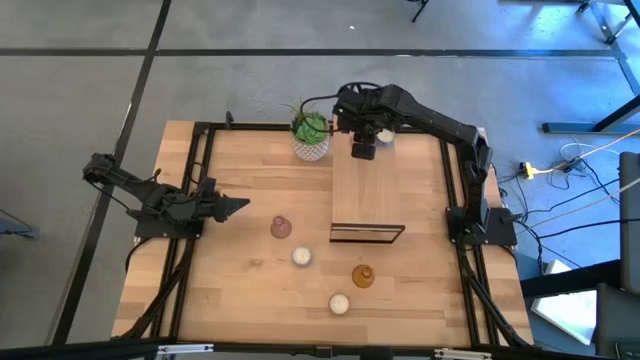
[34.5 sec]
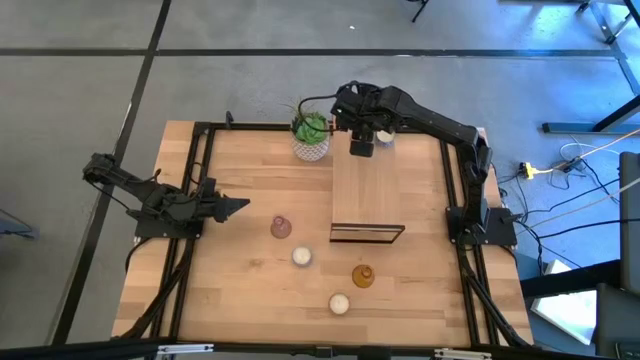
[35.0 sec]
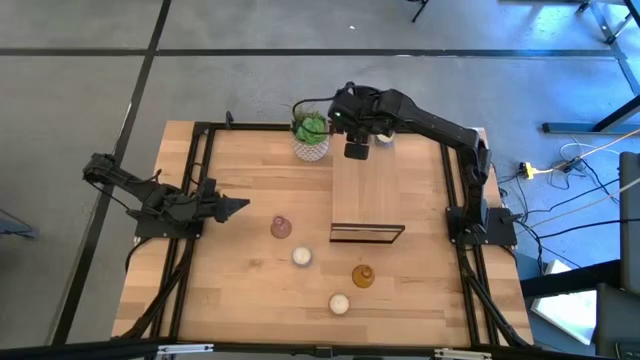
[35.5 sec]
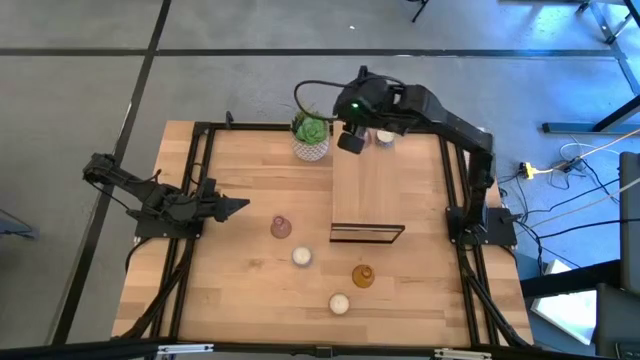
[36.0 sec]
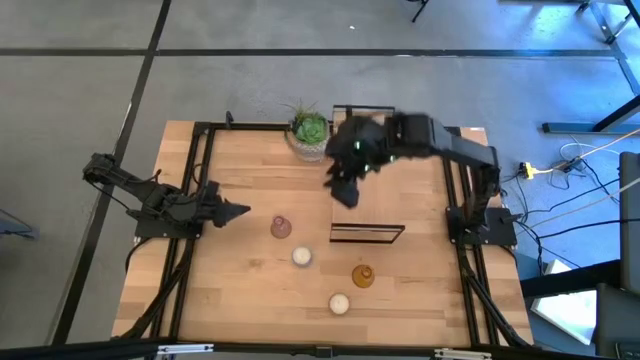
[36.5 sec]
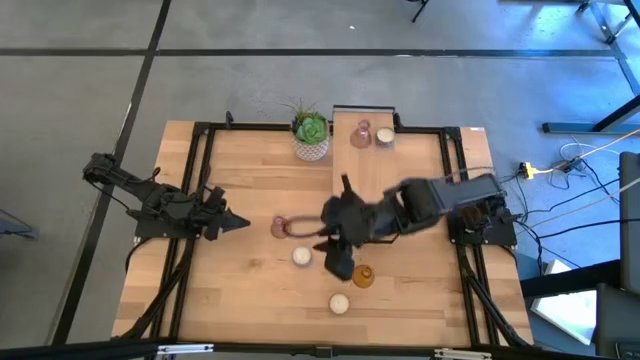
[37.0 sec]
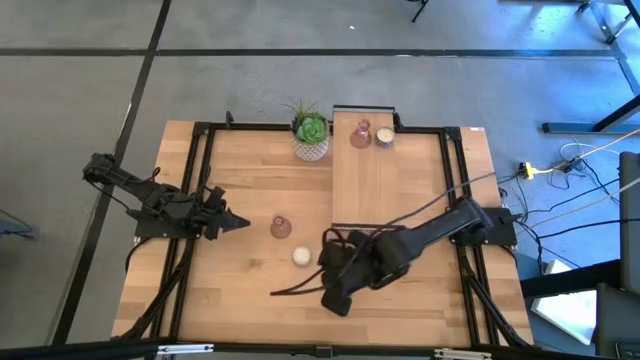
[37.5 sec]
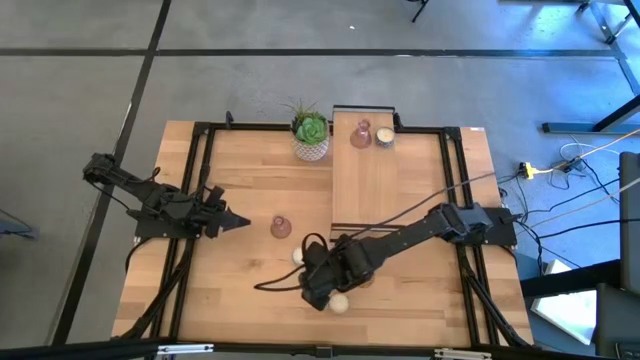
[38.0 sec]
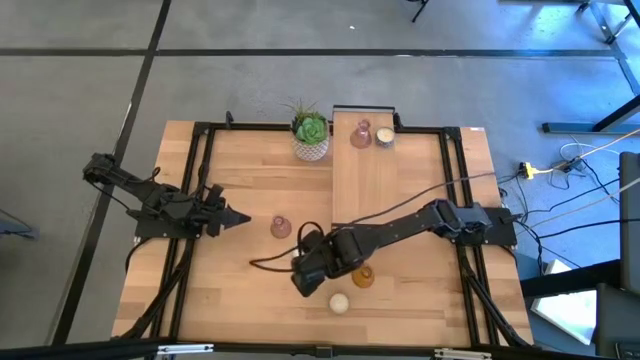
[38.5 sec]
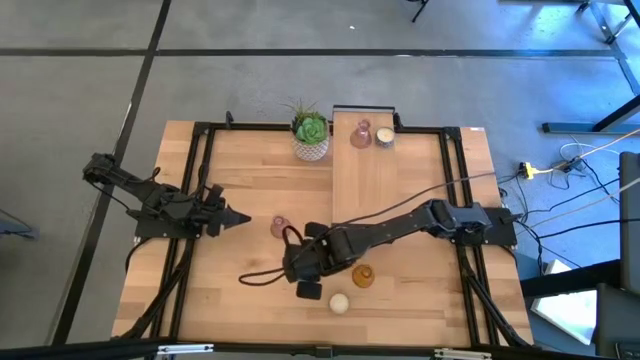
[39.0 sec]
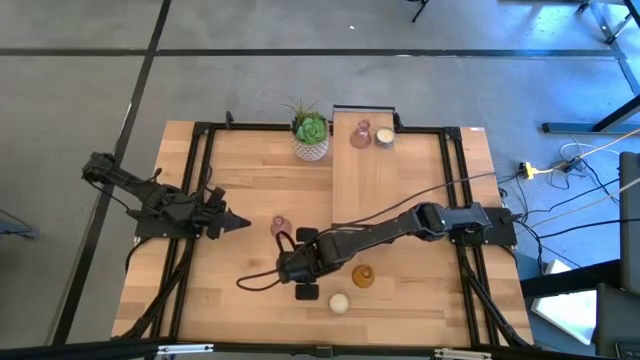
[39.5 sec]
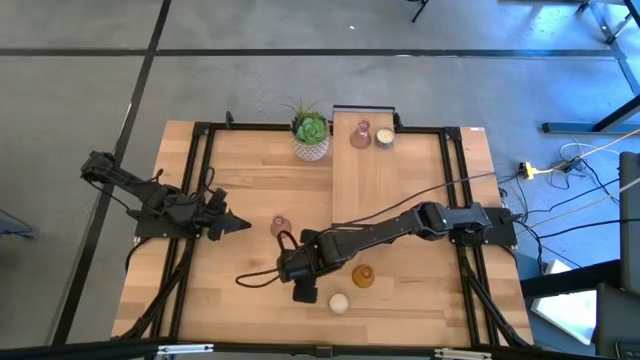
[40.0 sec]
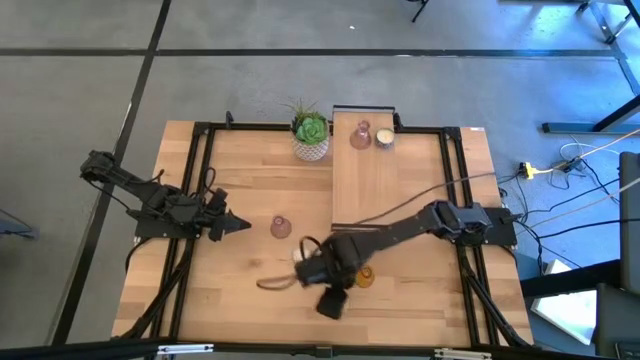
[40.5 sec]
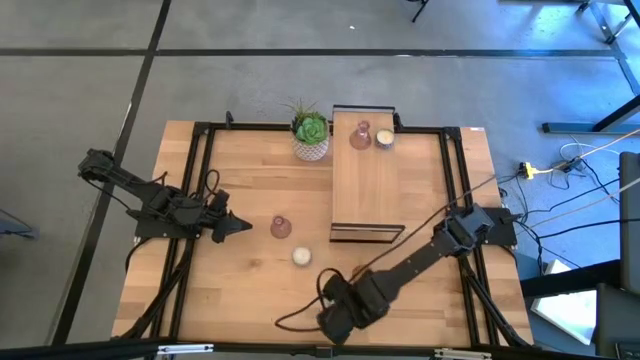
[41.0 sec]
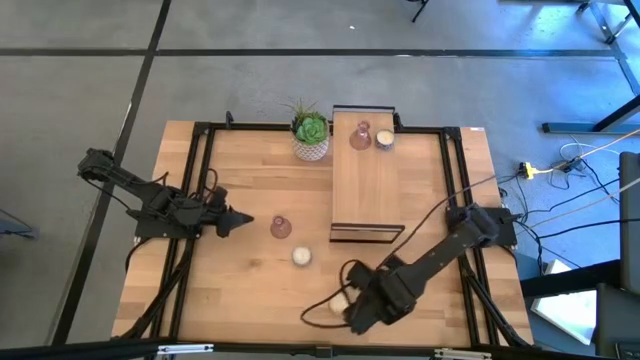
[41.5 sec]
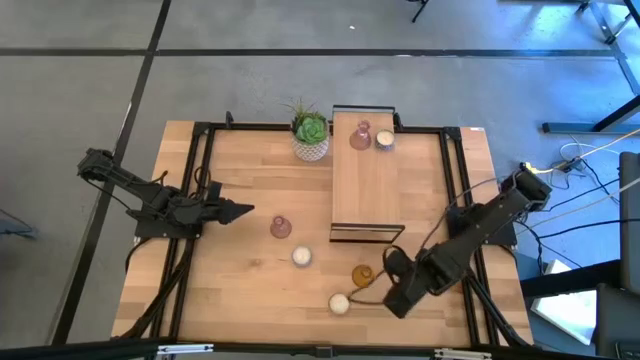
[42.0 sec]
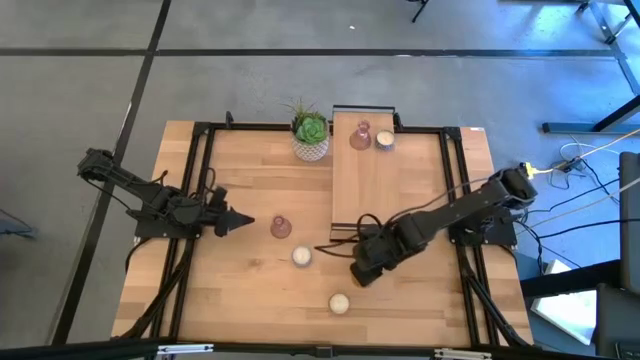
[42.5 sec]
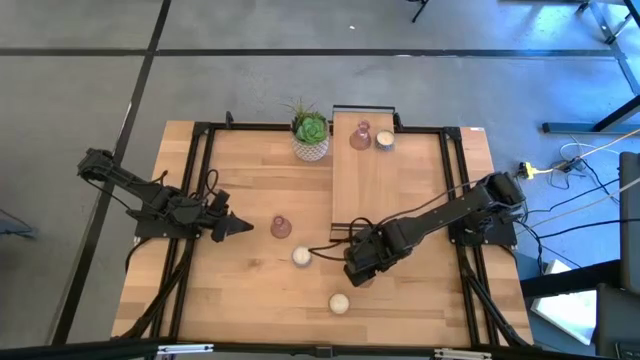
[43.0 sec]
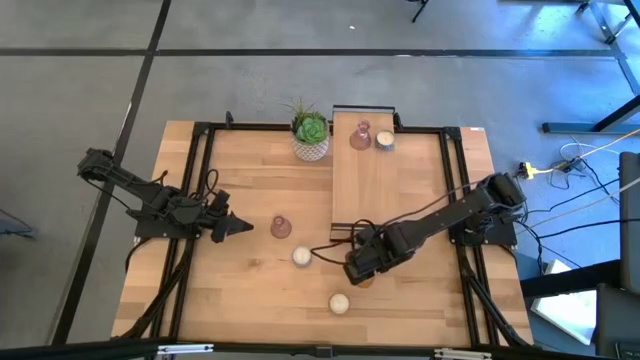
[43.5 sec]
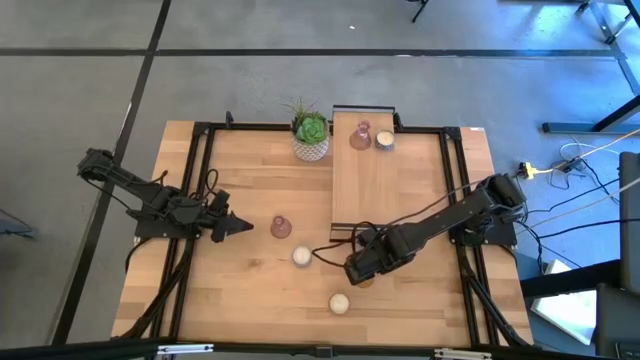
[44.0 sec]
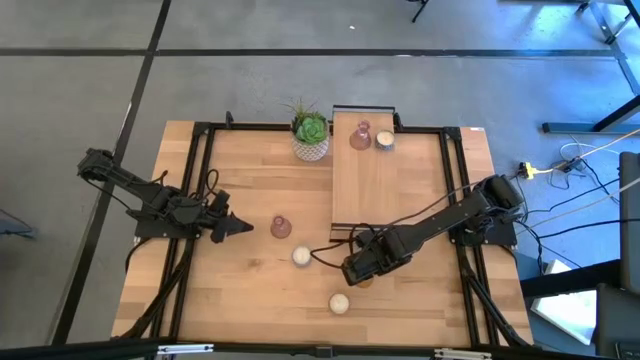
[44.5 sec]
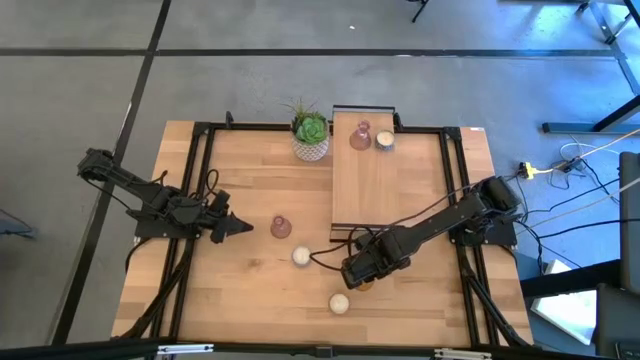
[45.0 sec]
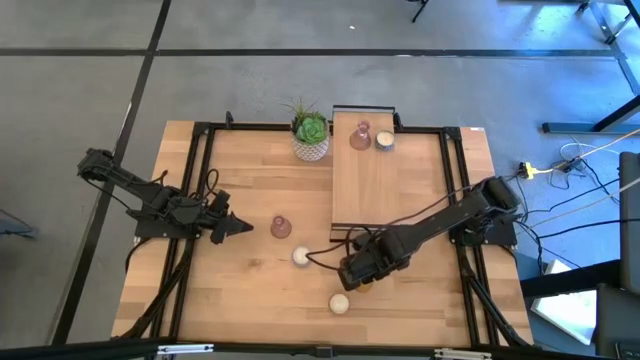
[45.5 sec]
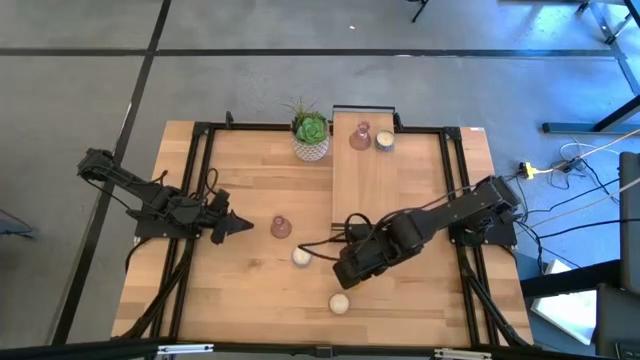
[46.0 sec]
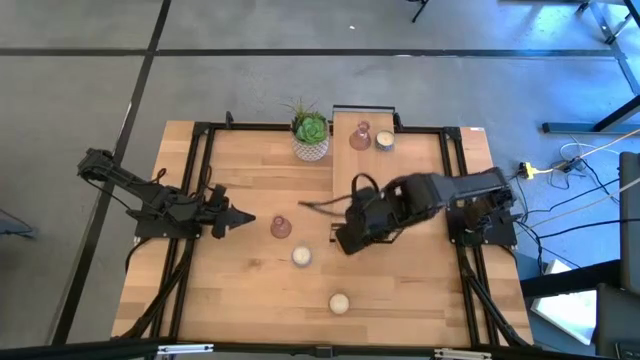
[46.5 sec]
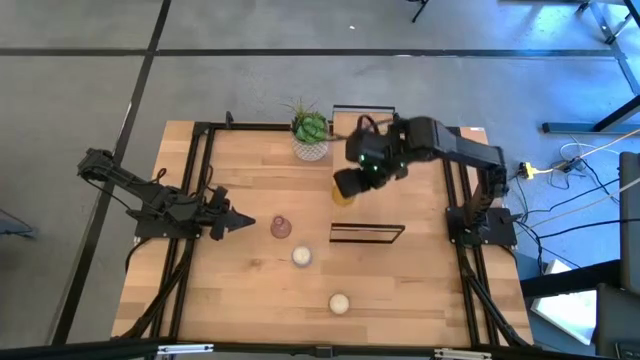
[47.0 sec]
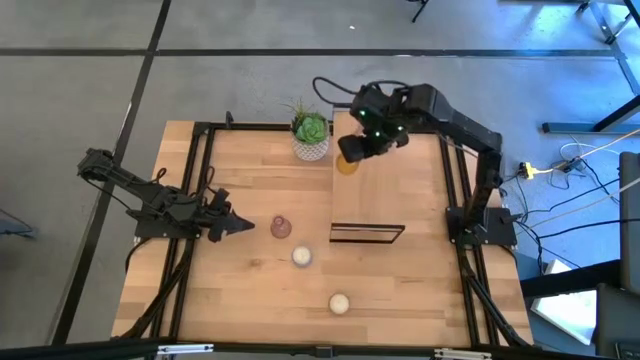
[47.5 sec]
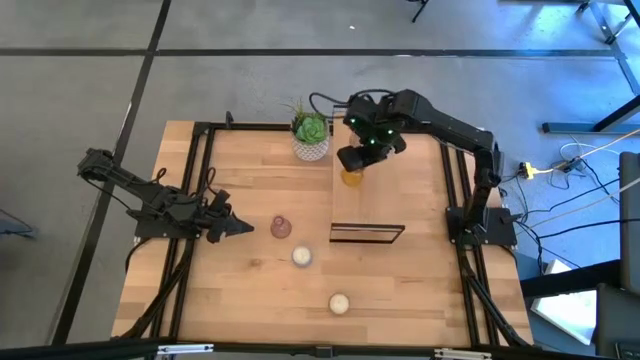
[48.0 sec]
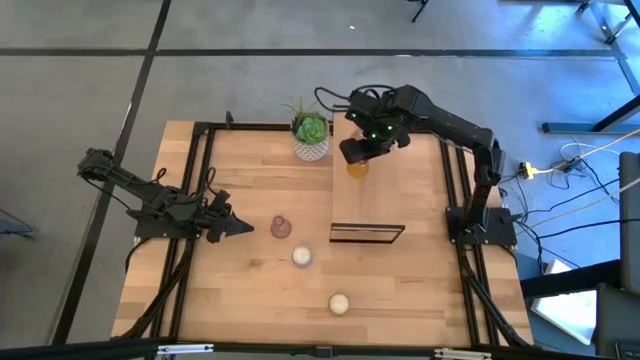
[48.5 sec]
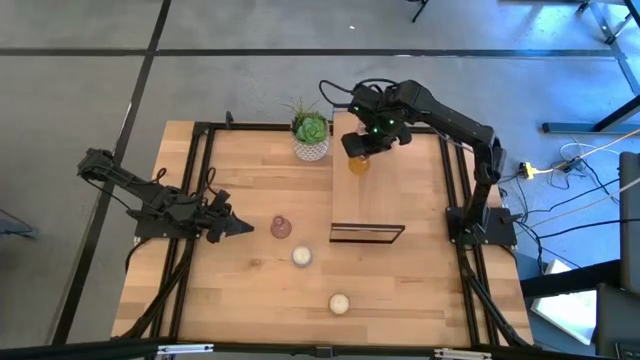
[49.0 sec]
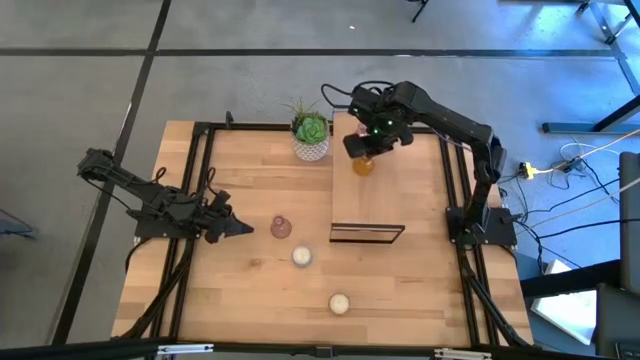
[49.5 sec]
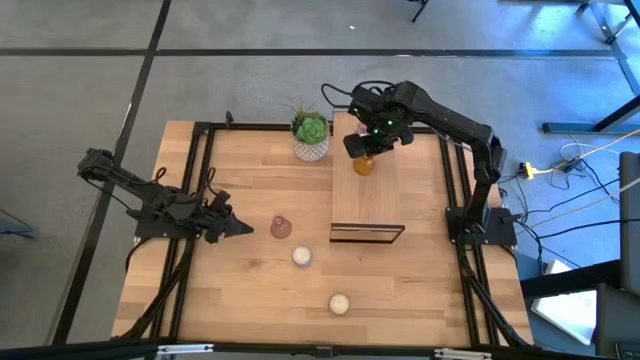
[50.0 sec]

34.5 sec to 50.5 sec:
Task: Pick & Place candle stick holders
Put the orange glass candle holder on the shelf aligned with the pink glass candle holder

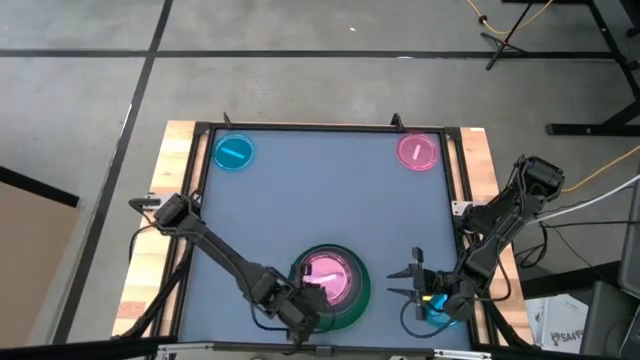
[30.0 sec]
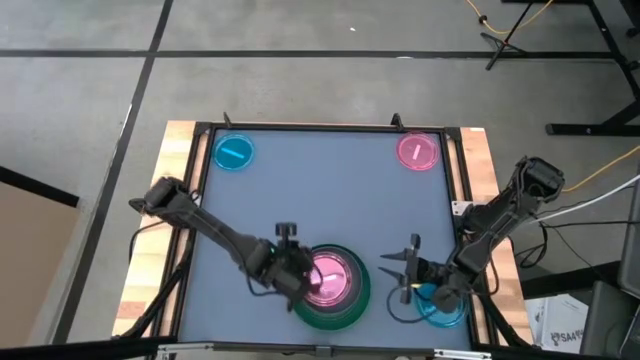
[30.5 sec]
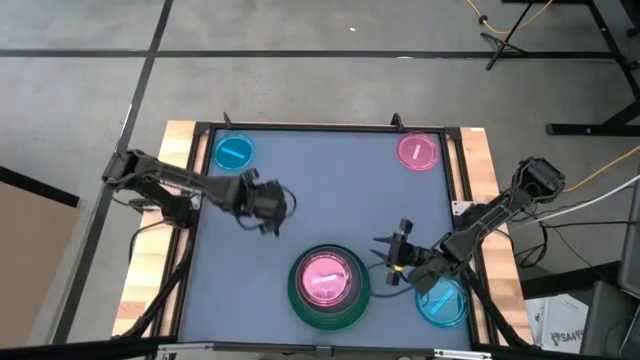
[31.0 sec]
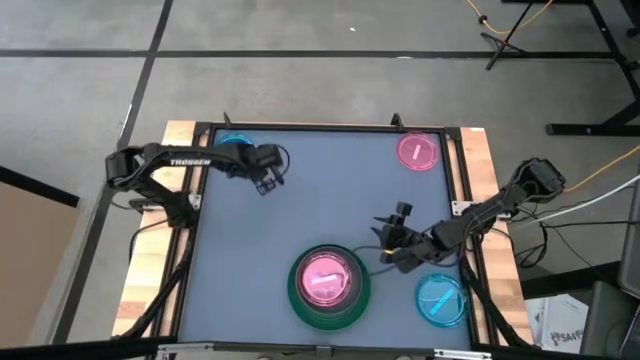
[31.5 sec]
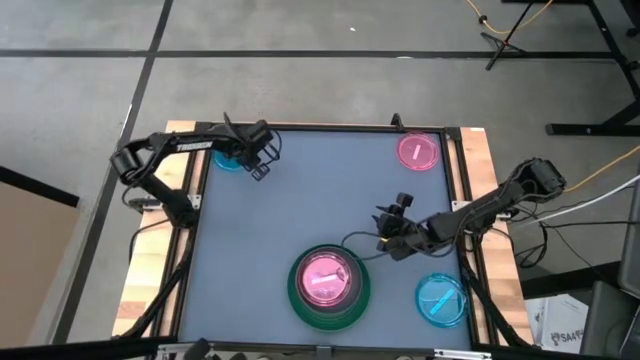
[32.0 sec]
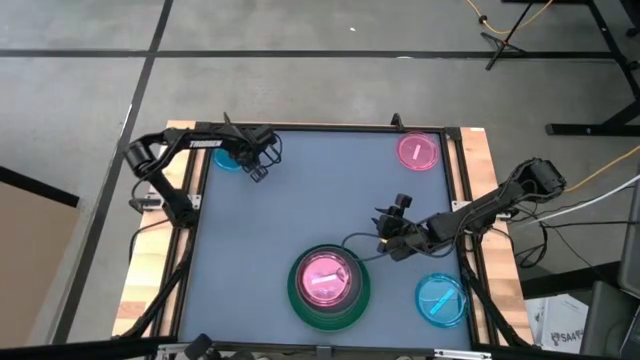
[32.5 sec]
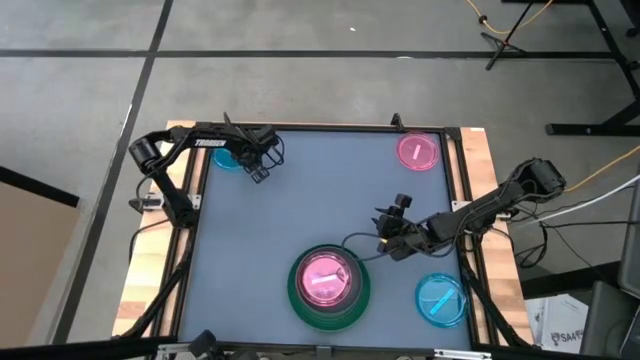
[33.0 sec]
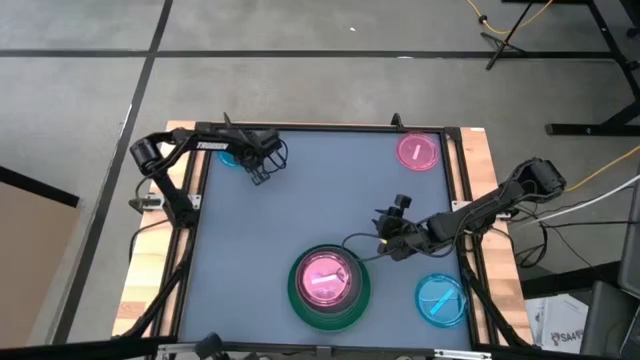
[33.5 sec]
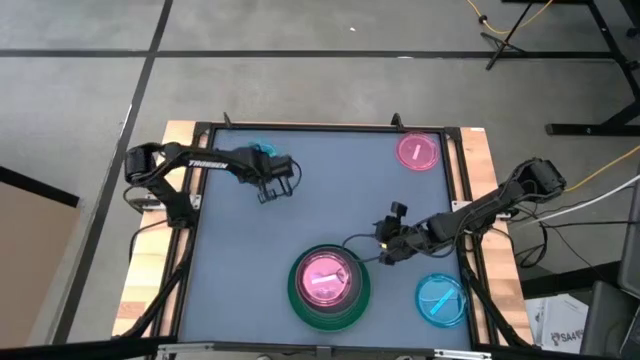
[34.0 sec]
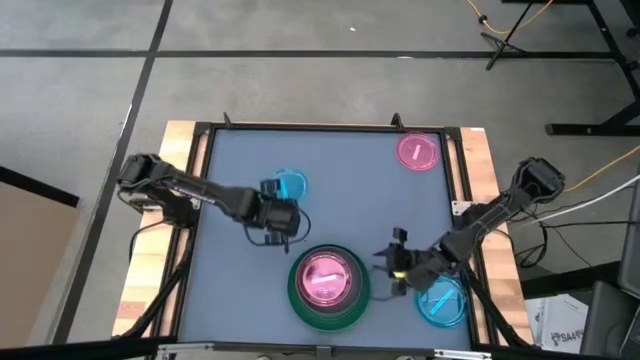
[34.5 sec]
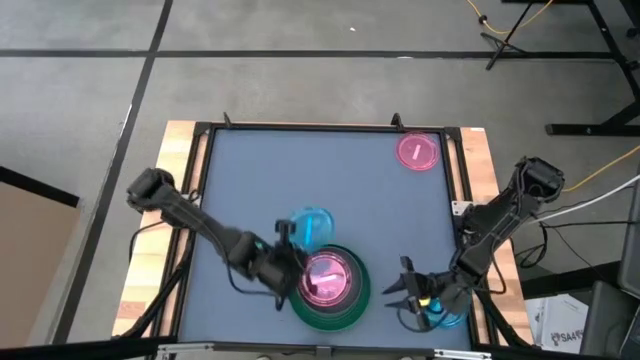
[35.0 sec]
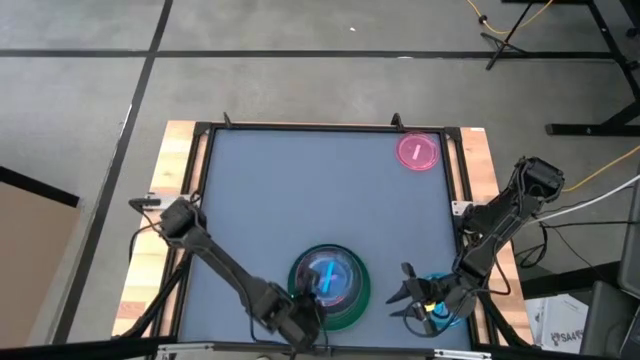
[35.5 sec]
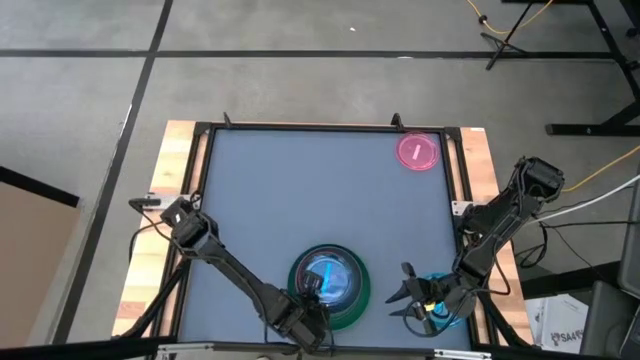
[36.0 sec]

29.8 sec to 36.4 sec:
Task: Stack plastic plates
Stack the top blue plate on top of the red plate
